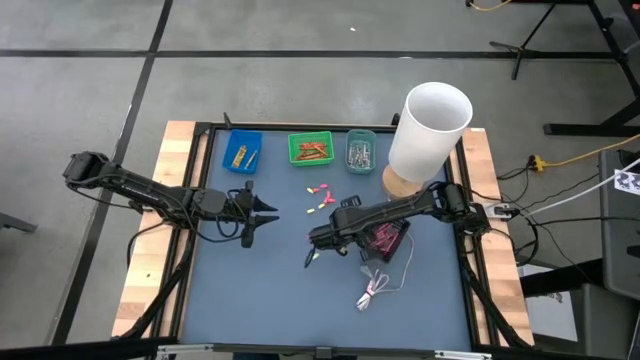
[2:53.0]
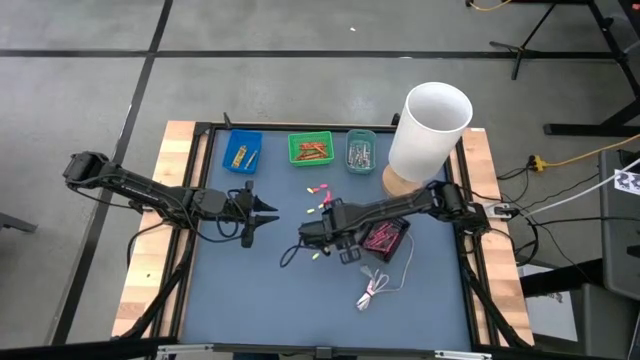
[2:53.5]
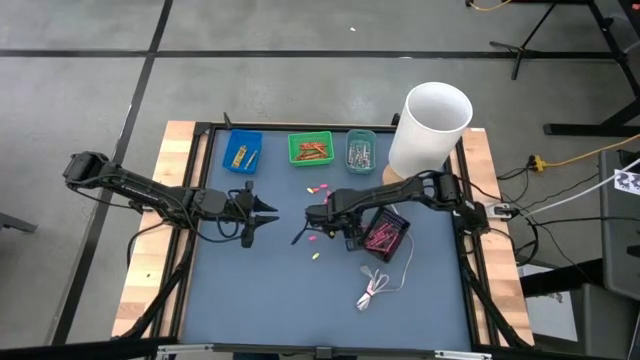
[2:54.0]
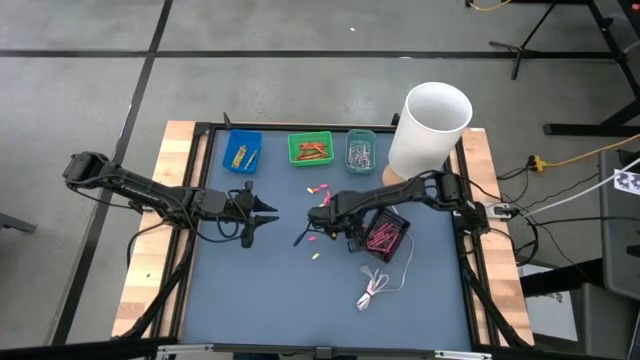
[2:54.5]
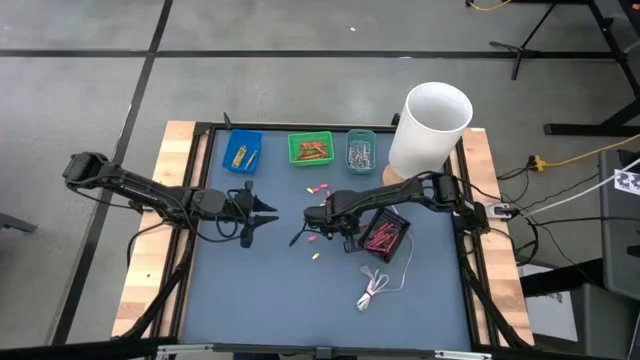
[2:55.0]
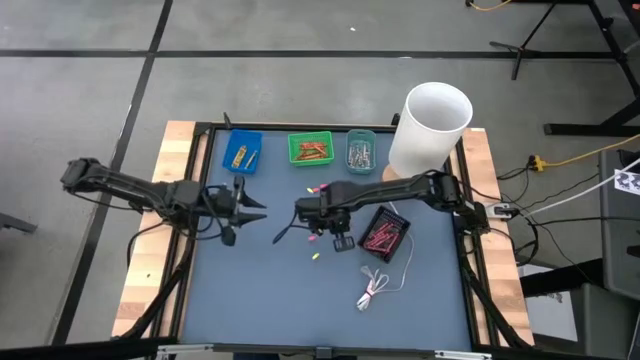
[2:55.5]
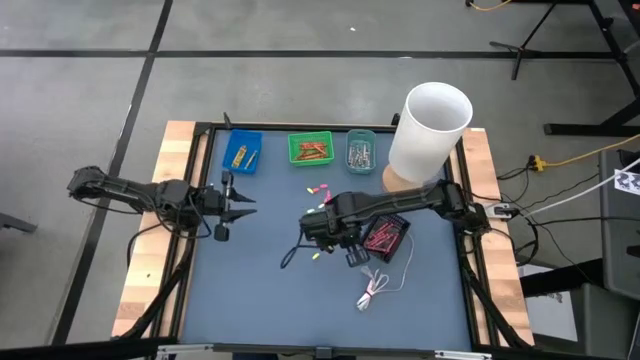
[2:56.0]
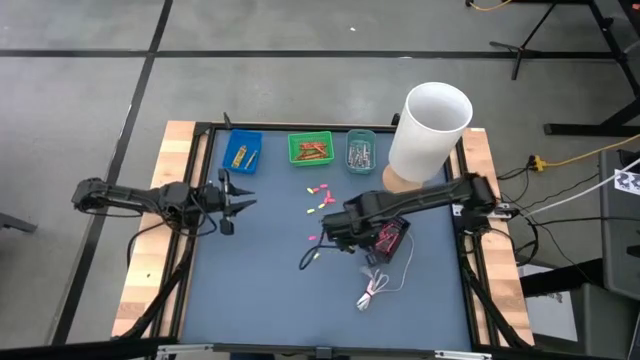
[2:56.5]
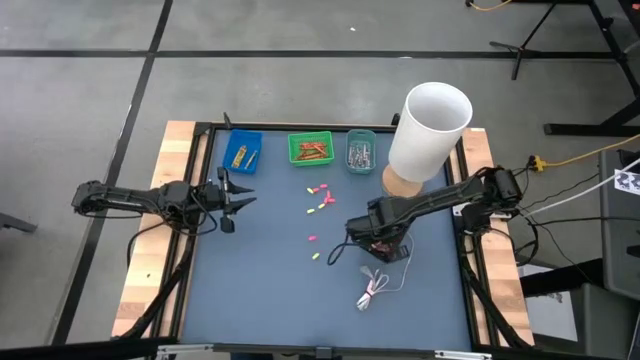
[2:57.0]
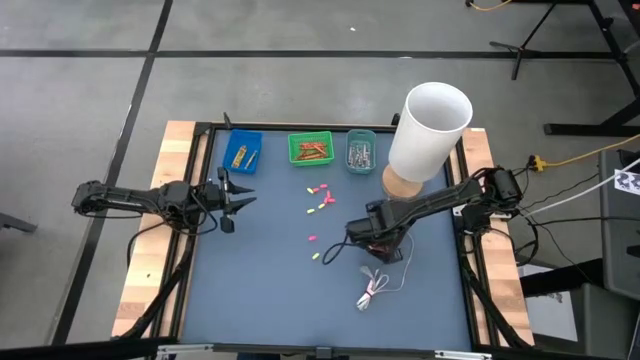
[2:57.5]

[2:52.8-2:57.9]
Task: Sort crayons
Put the red crayon into the black bin

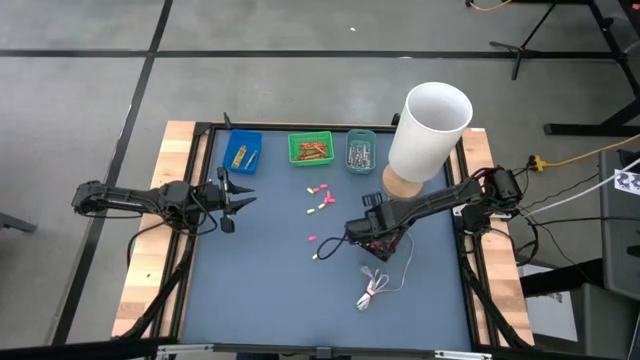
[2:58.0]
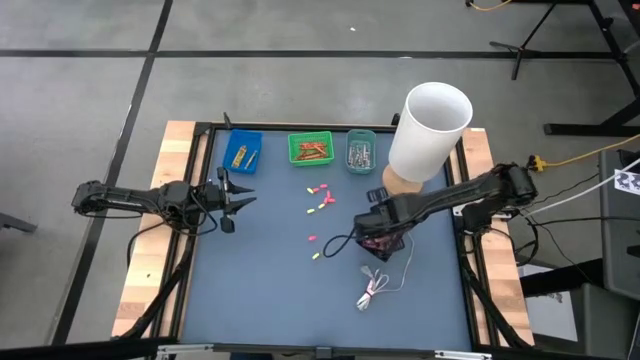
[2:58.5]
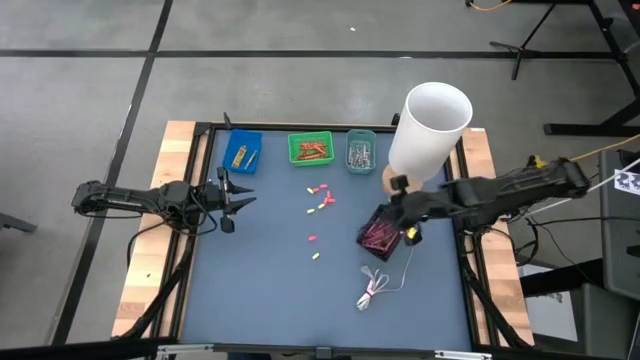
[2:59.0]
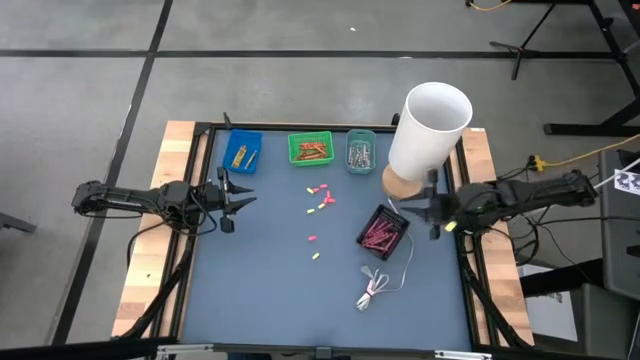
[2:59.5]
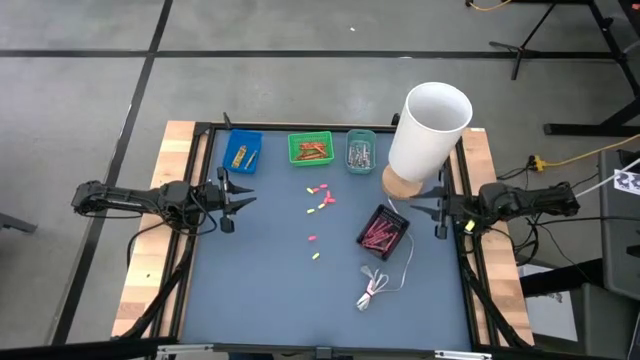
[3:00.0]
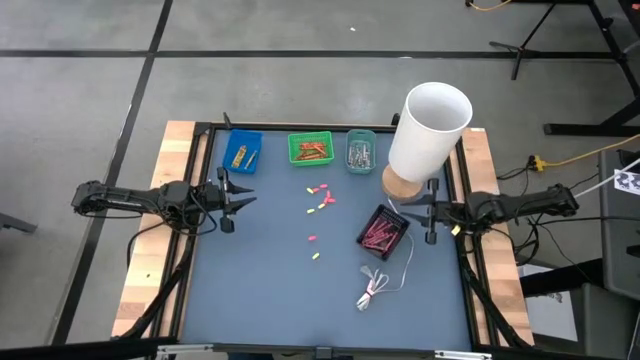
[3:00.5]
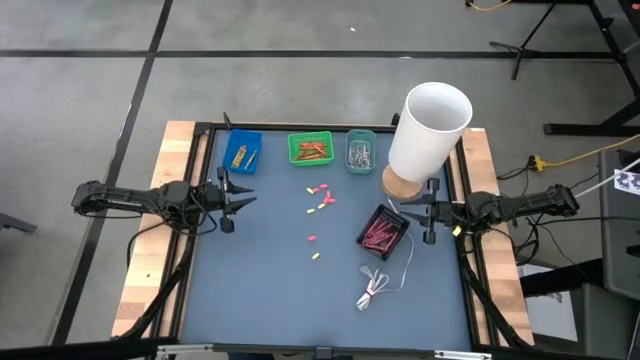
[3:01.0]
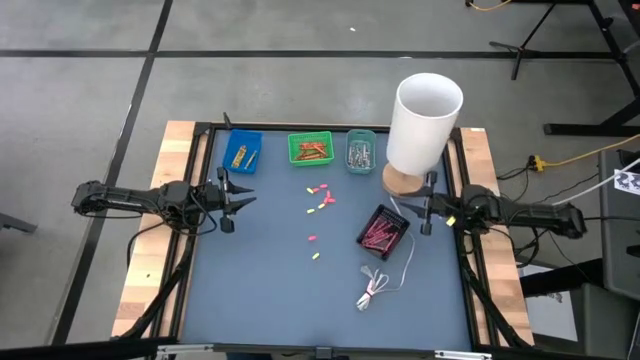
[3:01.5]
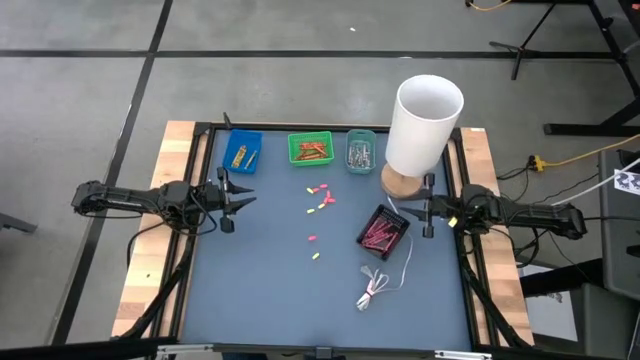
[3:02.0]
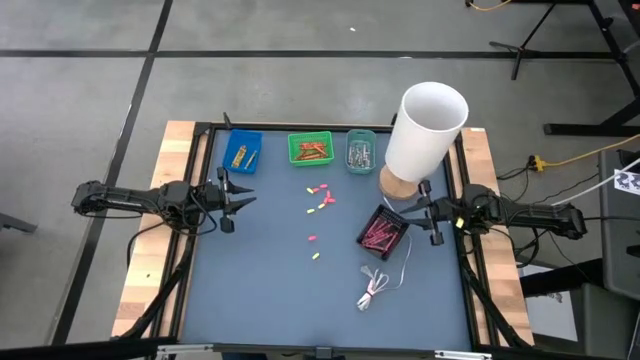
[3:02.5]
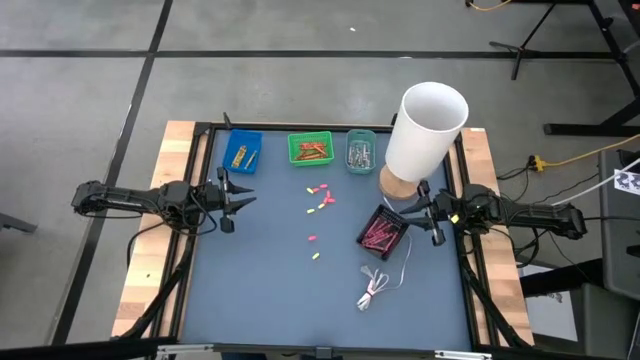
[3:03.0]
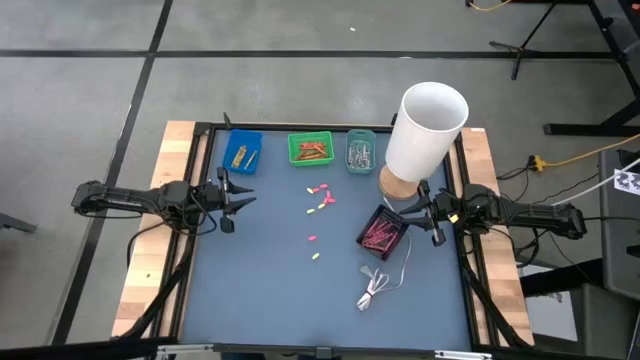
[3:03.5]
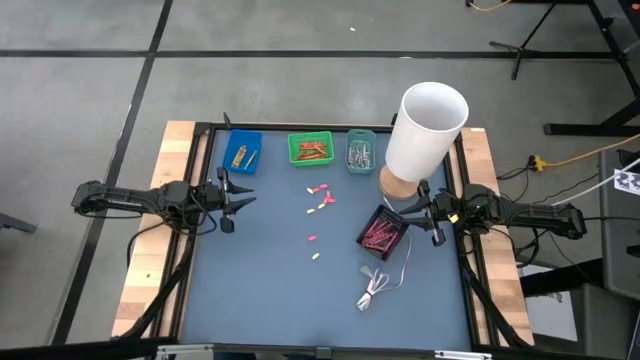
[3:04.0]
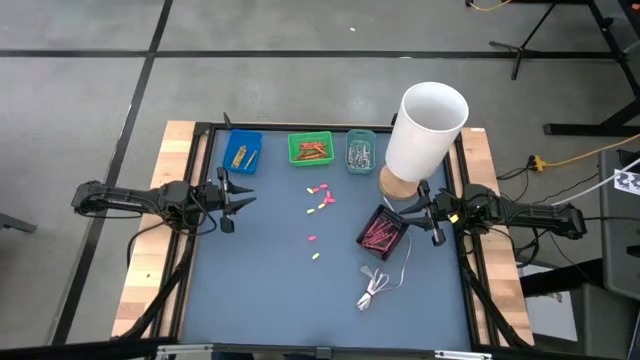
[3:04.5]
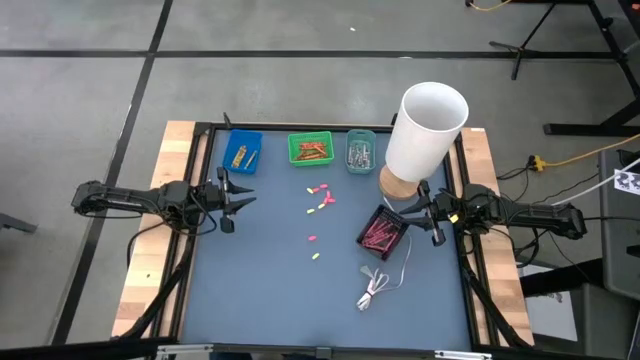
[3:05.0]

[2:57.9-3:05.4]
Return to Home Position

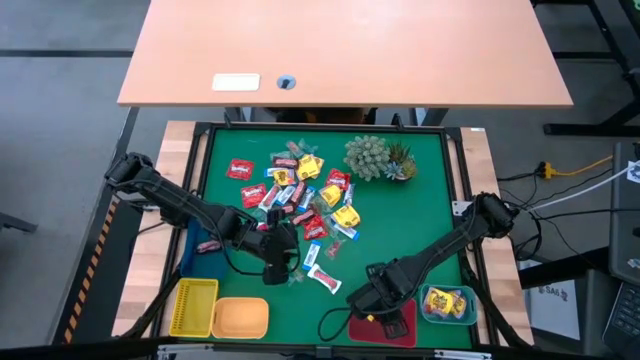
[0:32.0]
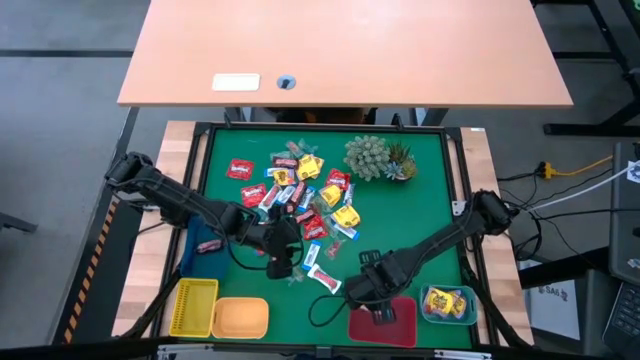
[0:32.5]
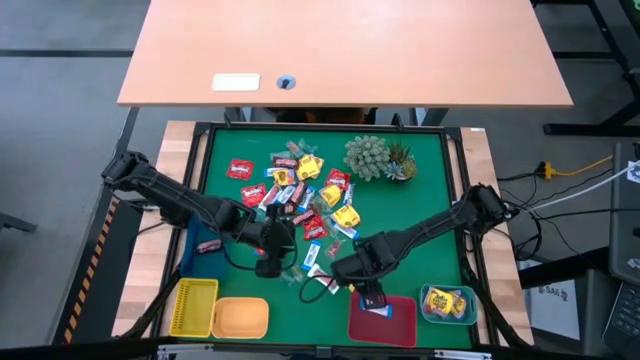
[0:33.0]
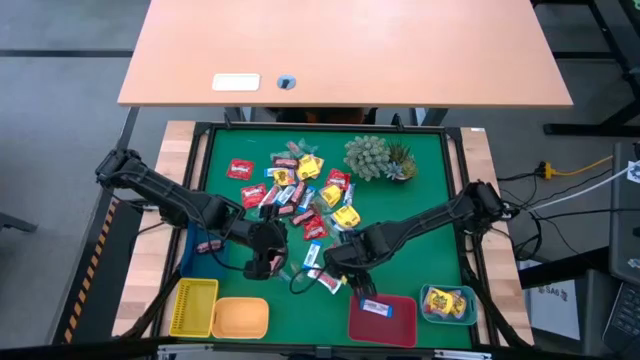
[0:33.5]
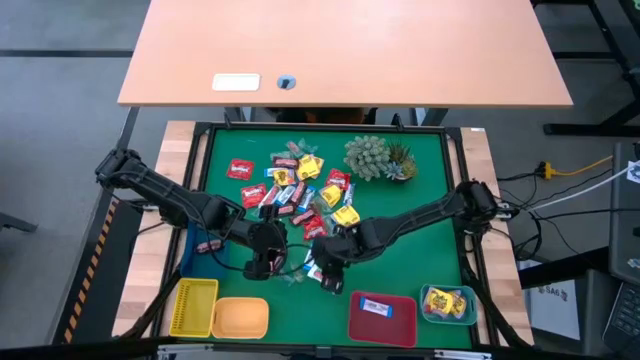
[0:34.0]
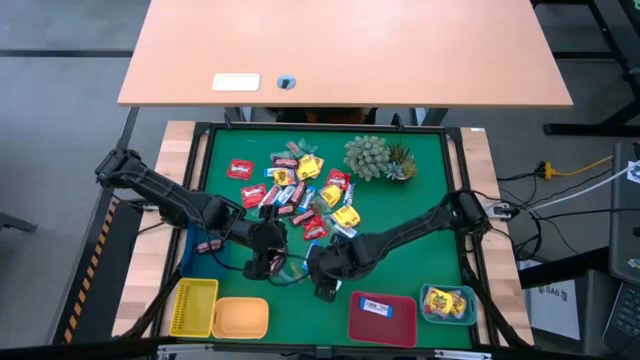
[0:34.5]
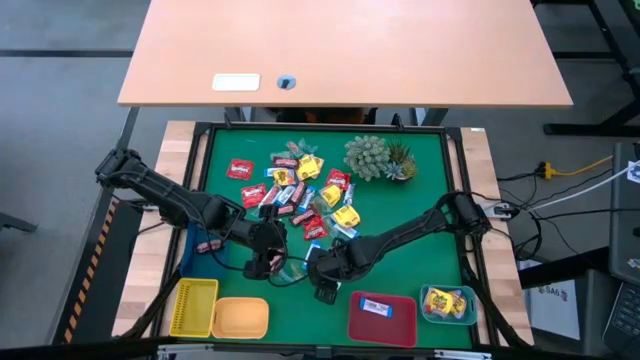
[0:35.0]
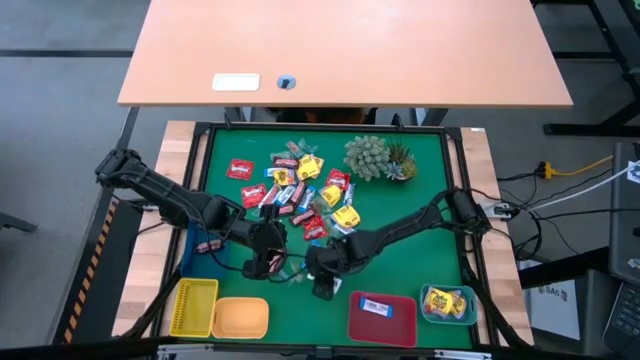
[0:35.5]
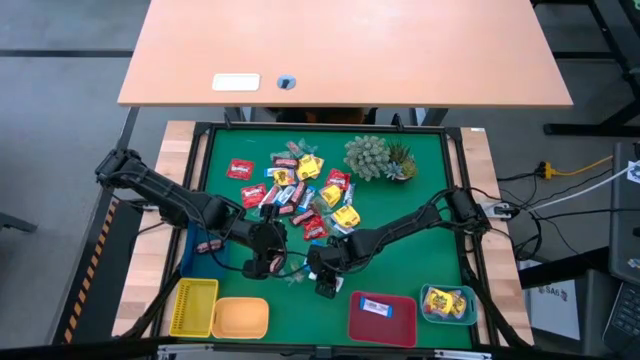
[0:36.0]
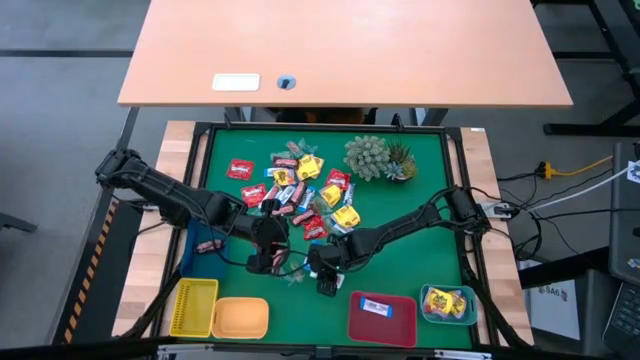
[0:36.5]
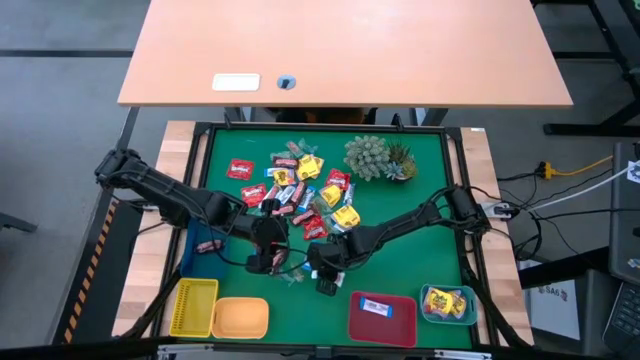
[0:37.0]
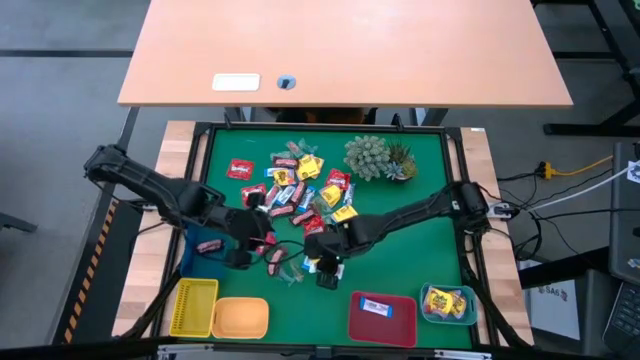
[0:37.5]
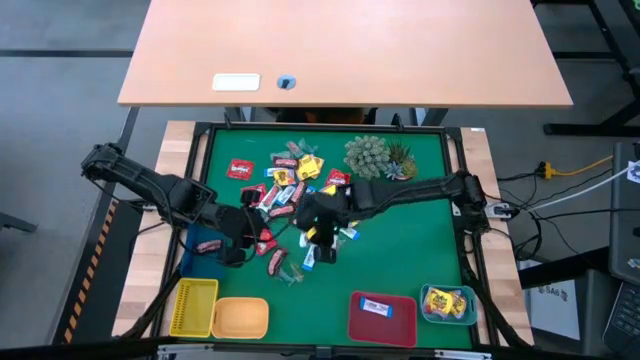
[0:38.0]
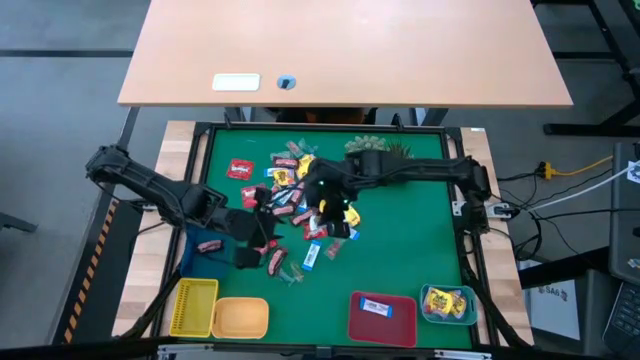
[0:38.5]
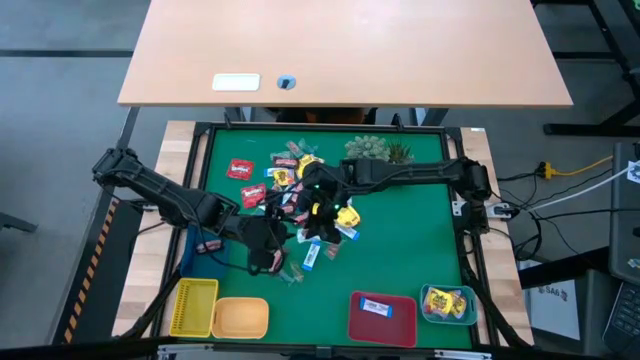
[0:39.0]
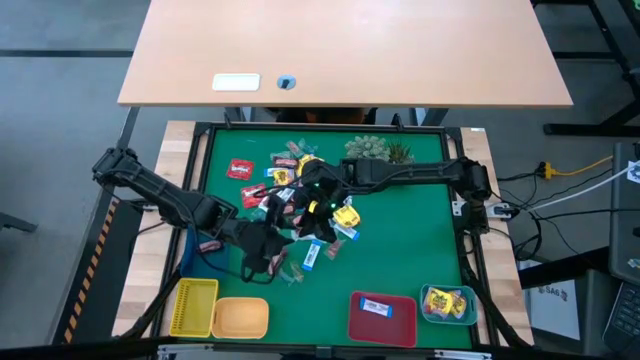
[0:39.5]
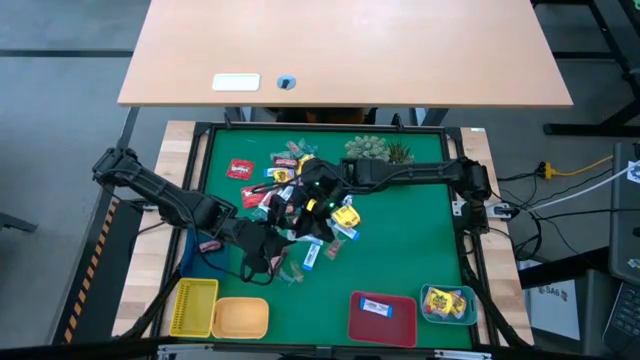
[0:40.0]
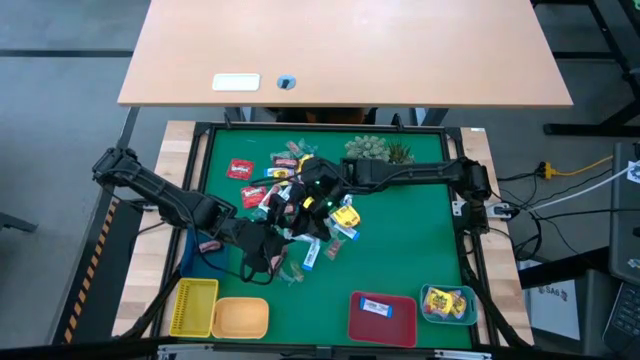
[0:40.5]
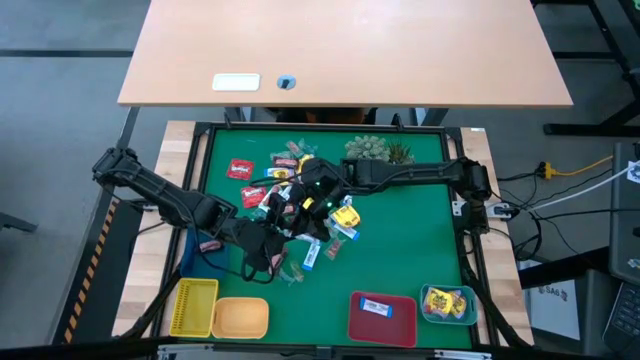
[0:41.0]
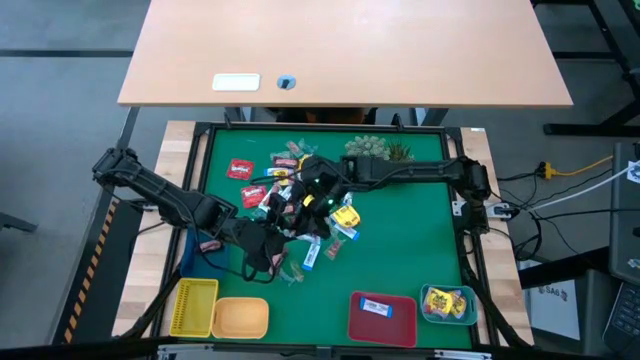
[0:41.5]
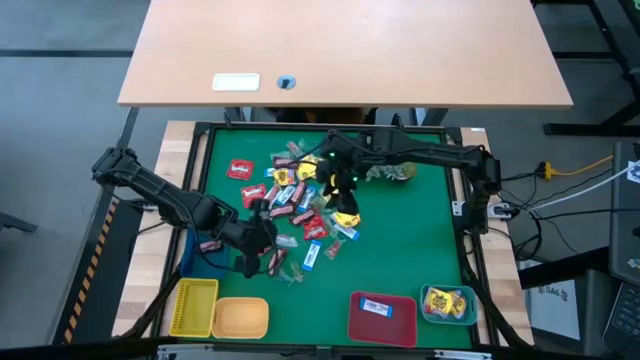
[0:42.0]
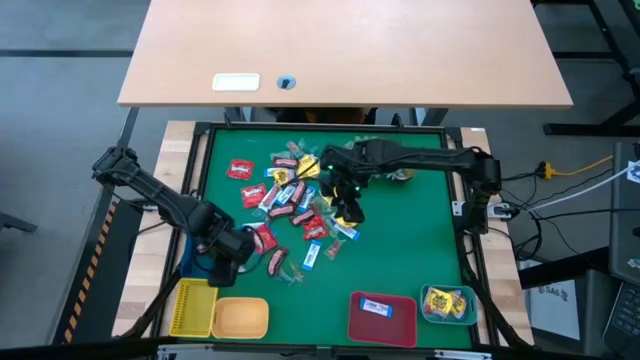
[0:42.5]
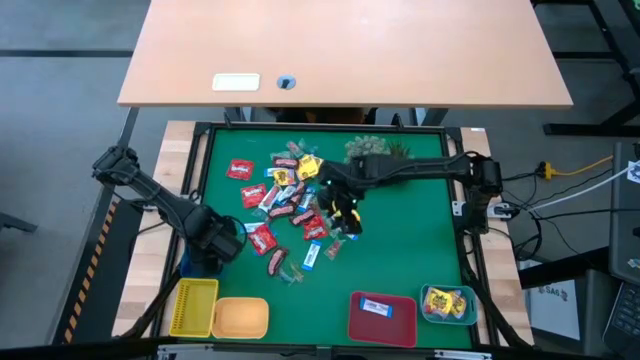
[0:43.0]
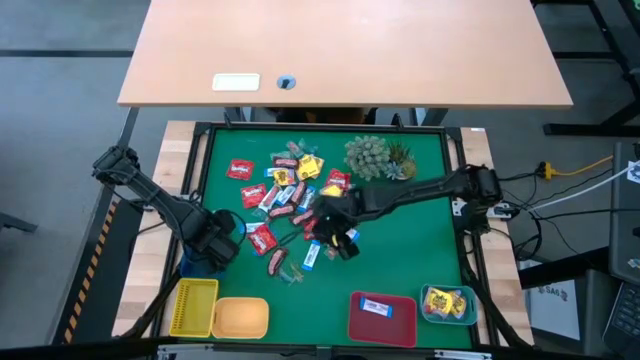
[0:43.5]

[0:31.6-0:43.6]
Task: Sort candy
Put the white chocolate into the blue bin
